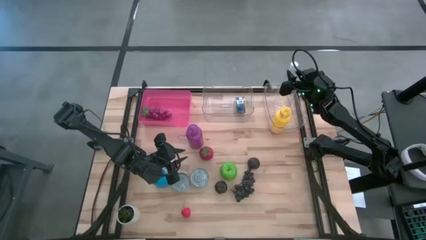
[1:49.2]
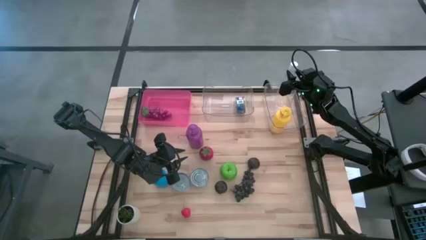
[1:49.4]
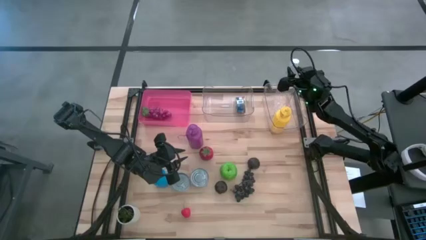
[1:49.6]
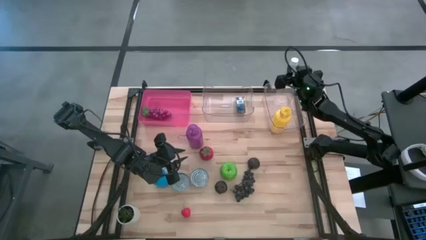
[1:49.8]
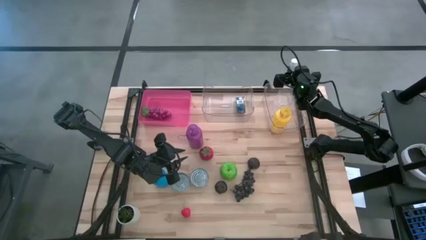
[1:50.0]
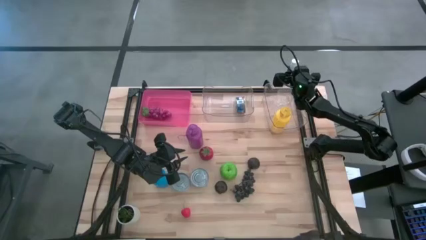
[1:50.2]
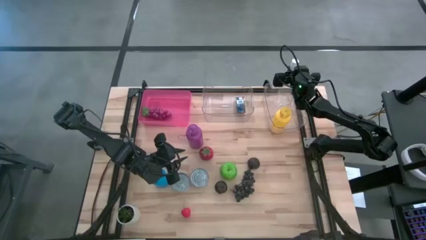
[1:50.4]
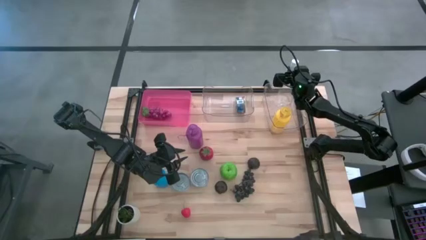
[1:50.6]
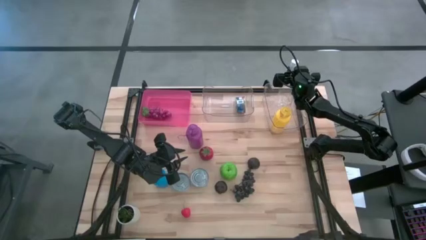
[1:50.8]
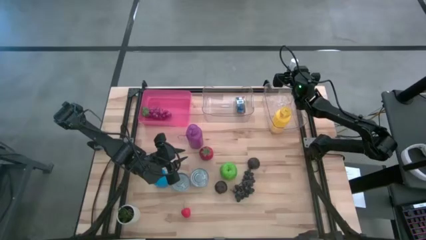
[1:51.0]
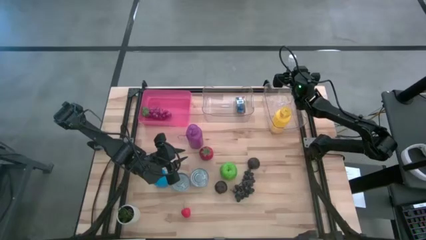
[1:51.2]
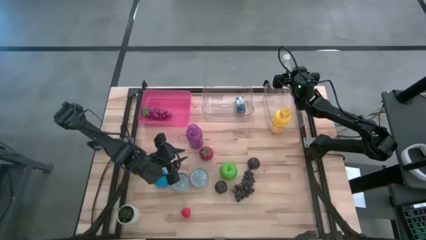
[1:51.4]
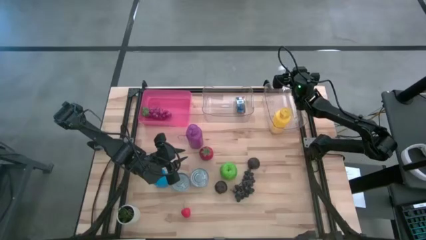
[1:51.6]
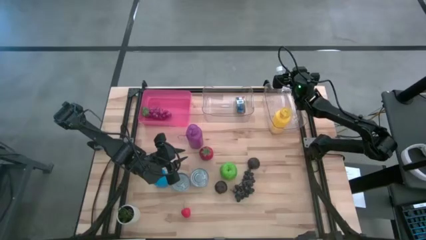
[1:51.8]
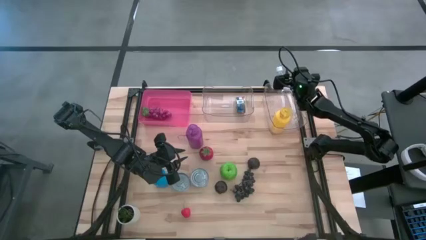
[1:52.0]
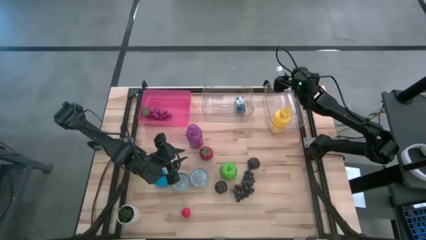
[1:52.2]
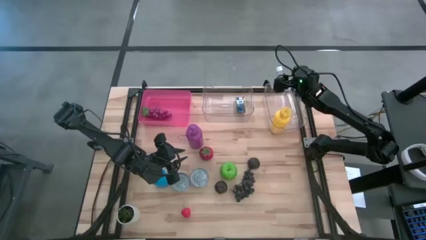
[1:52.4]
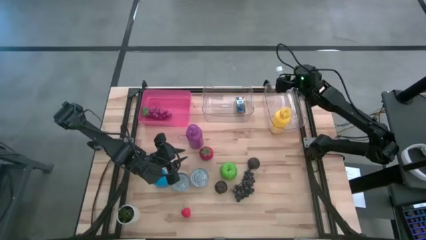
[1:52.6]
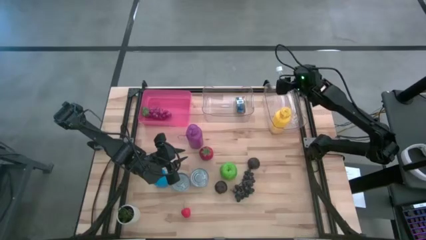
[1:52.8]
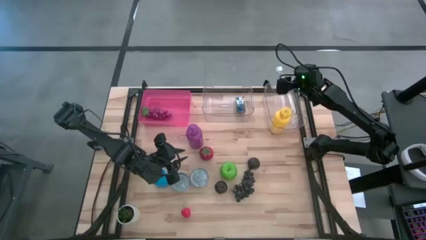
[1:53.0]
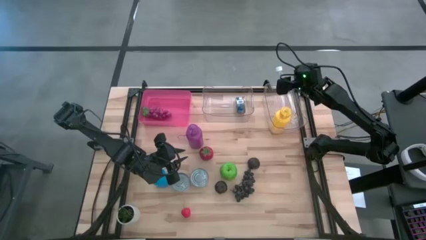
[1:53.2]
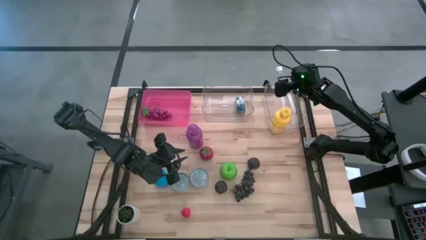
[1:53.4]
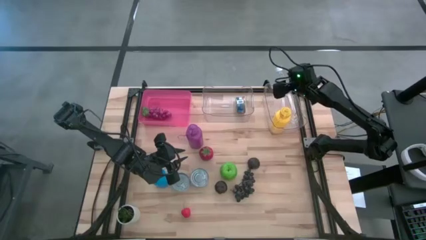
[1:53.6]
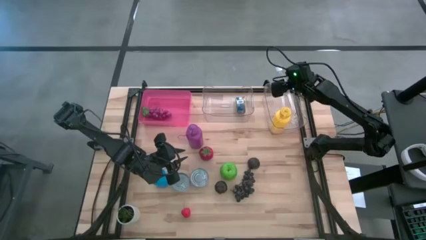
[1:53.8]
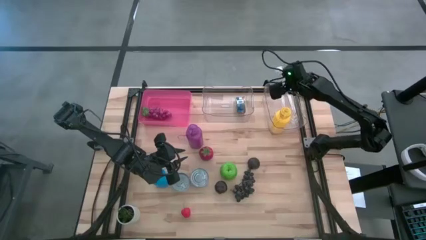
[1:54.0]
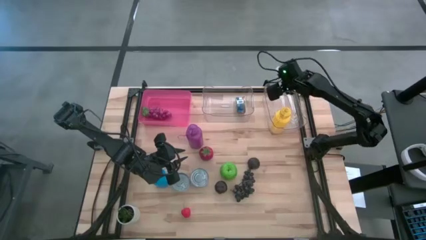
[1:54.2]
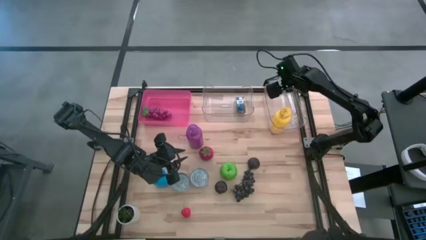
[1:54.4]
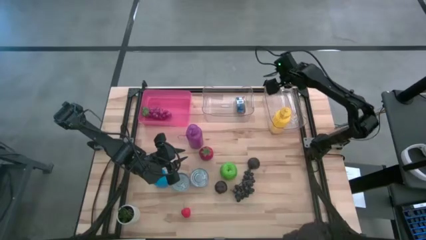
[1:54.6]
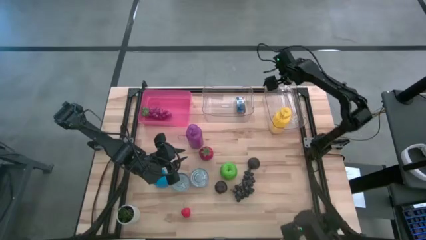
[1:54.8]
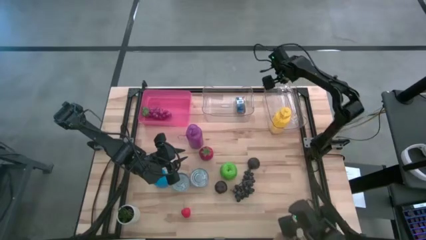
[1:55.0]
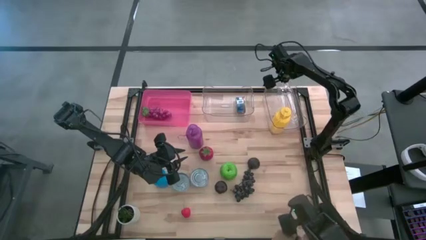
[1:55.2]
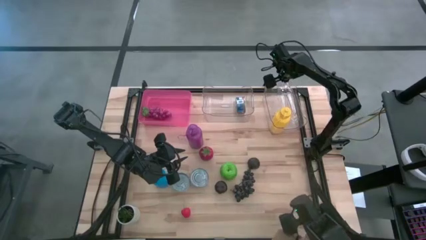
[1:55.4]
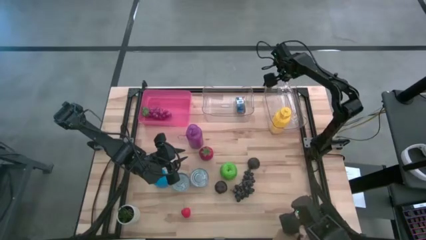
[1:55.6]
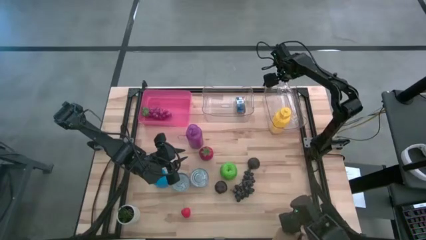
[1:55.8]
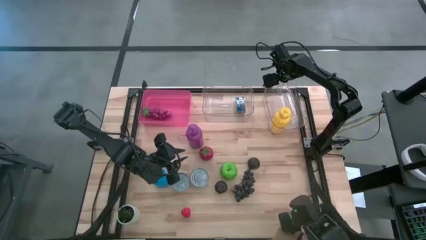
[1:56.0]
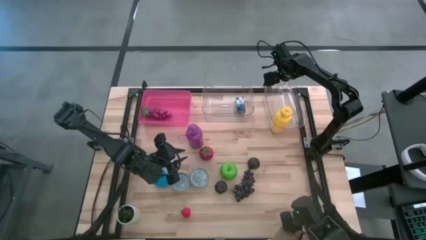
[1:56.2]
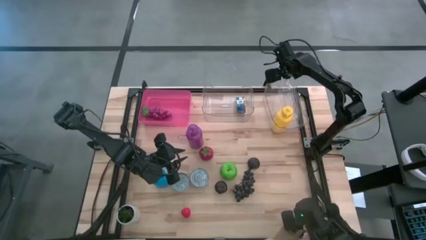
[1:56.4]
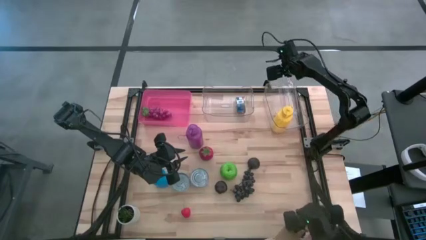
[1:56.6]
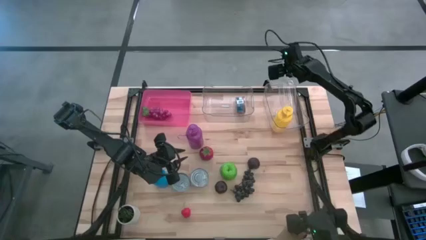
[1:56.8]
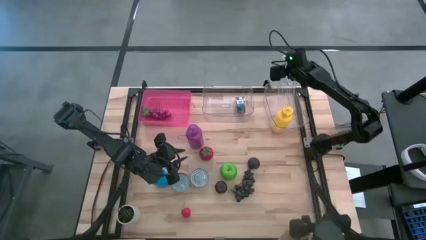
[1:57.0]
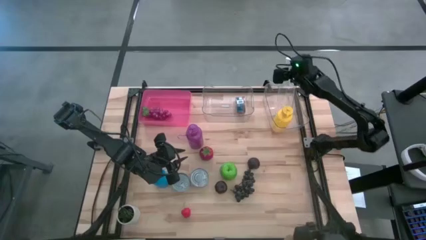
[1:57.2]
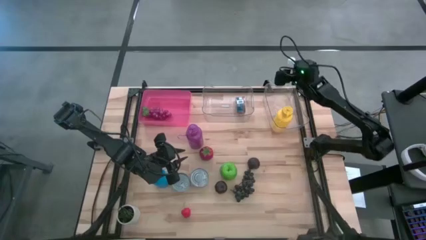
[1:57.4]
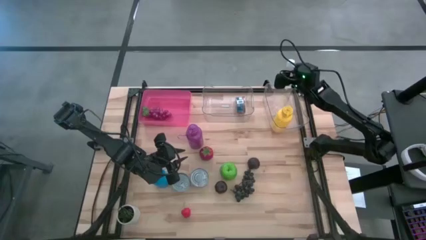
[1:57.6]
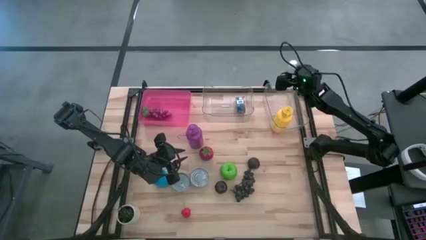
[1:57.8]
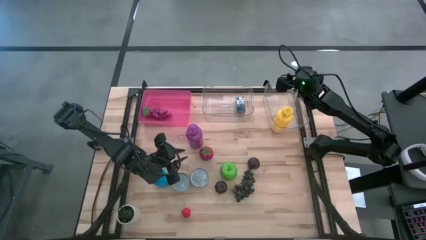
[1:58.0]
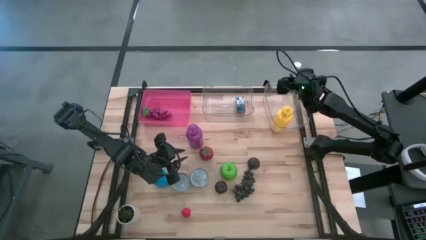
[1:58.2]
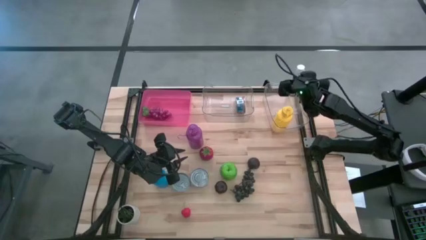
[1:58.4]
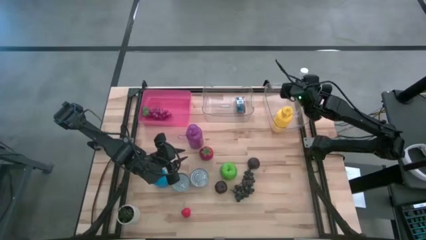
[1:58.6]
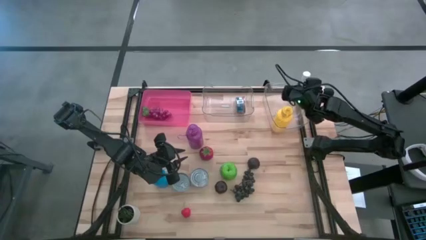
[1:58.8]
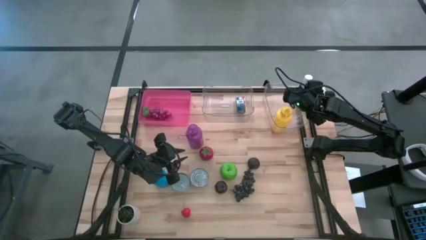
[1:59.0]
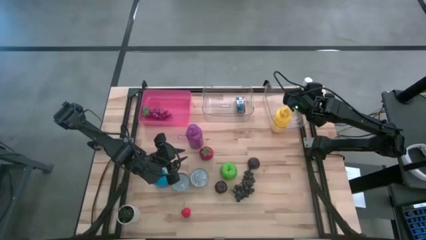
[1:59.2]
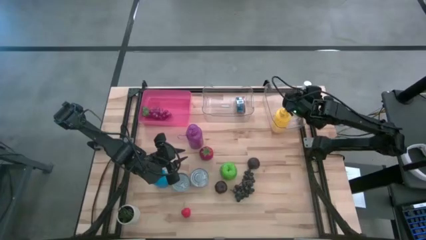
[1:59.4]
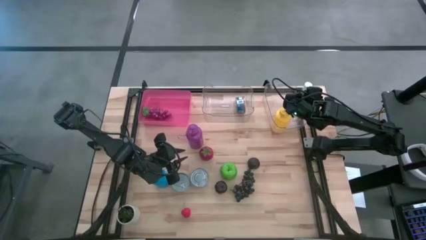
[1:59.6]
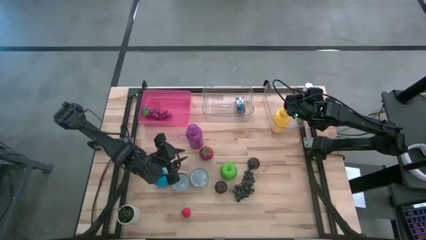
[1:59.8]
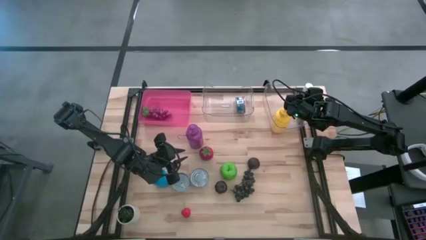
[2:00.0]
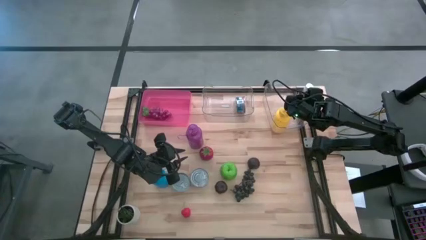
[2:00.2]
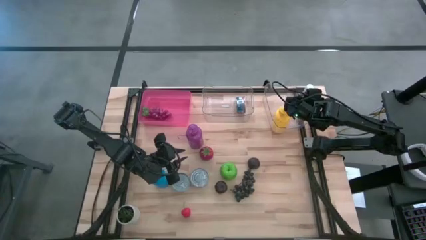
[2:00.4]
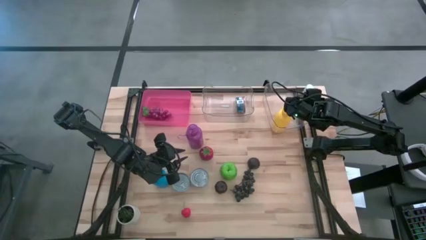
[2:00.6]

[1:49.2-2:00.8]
Task: Pick & Place Food Item
Adjust the transparent water bottle in the right transparent bin

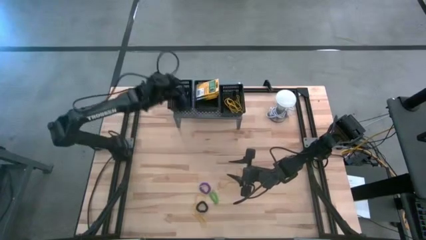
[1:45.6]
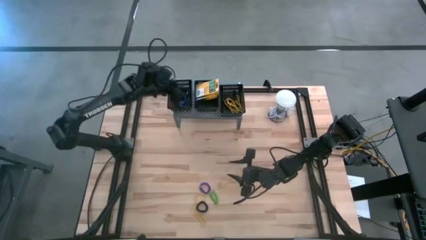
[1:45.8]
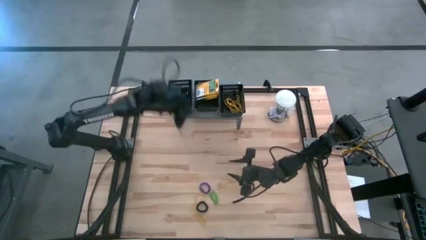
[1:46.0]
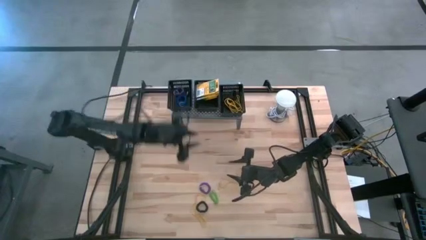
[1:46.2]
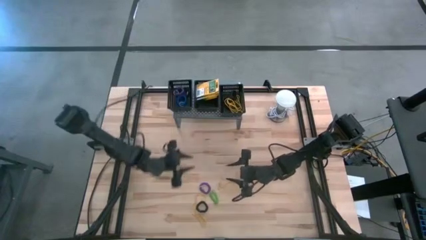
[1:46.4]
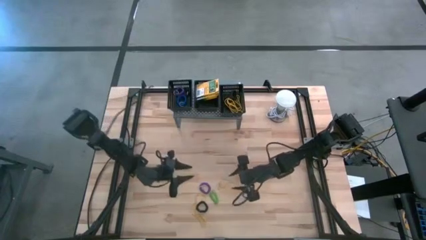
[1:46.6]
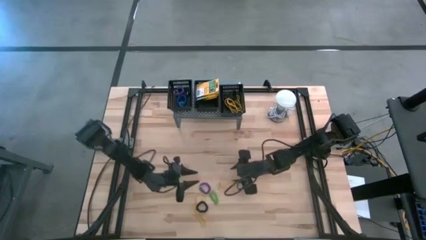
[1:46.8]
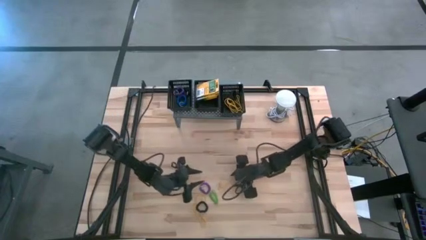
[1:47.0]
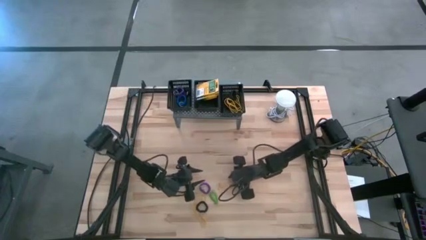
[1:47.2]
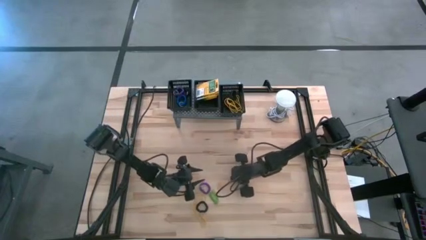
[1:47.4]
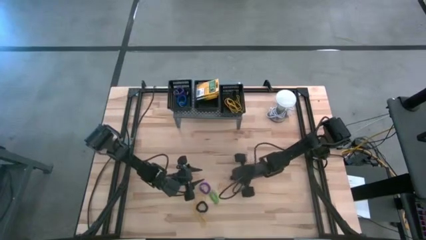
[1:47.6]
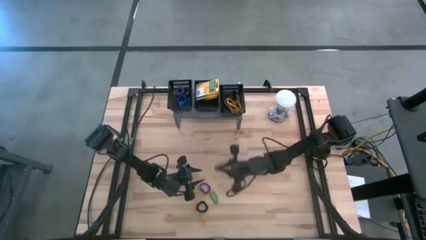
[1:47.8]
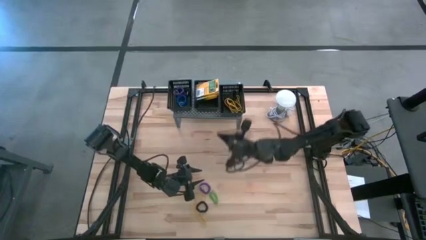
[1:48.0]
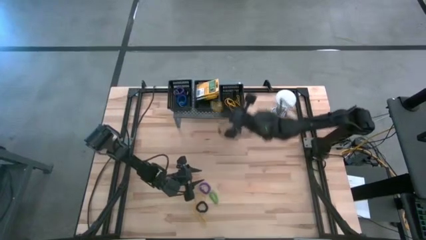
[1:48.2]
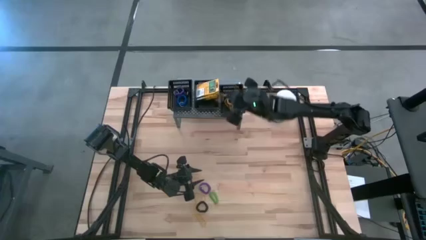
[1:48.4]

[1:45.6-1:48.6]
Task: Pick & Place Office Desk Supplies
Put the yellow rubber band into the right black bin on the shelf

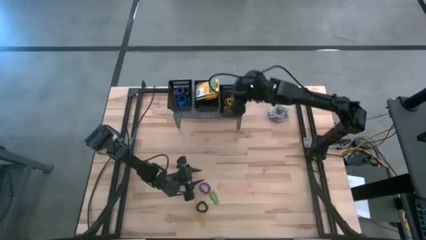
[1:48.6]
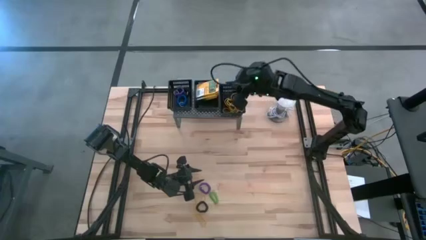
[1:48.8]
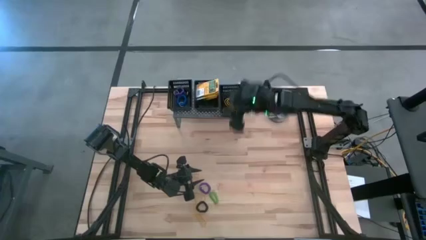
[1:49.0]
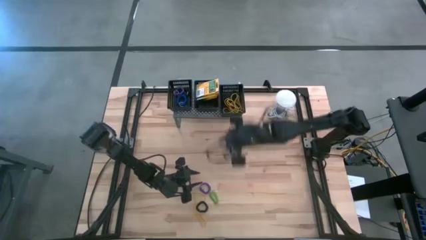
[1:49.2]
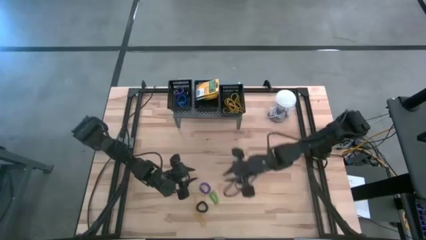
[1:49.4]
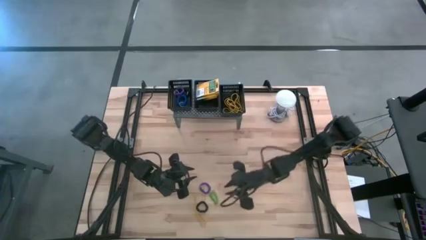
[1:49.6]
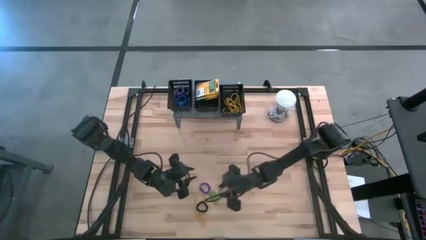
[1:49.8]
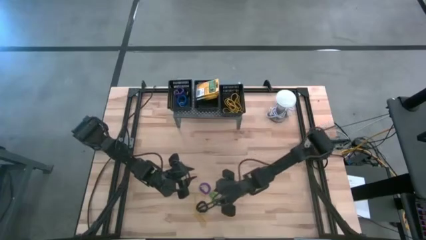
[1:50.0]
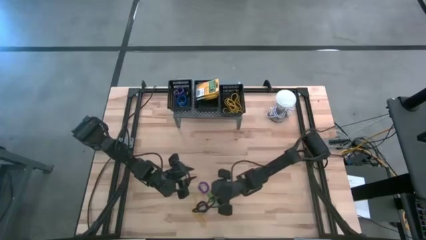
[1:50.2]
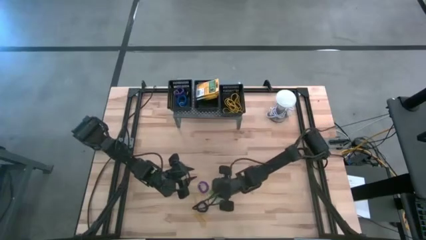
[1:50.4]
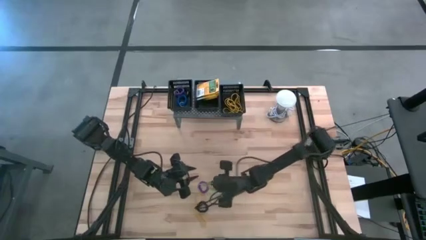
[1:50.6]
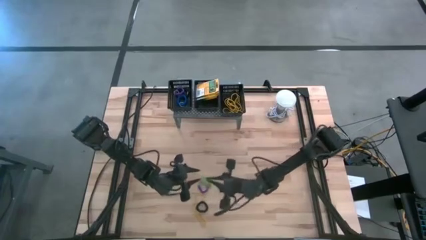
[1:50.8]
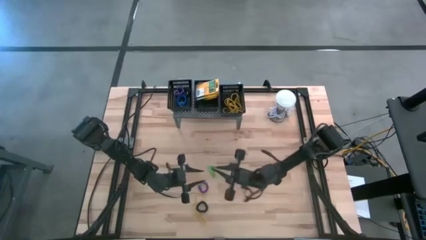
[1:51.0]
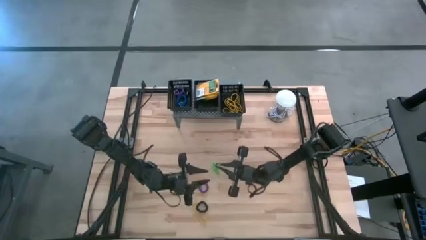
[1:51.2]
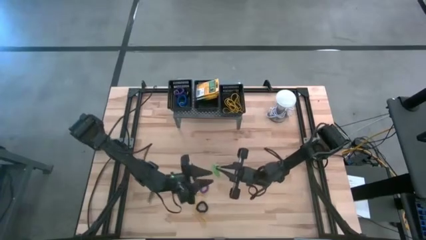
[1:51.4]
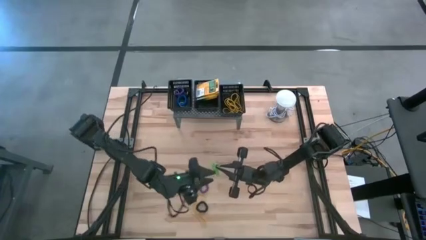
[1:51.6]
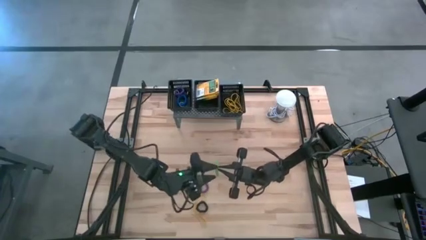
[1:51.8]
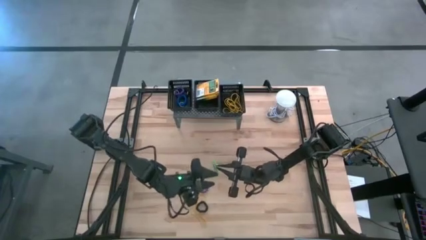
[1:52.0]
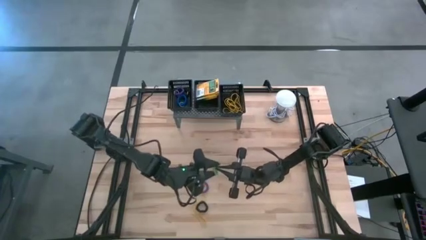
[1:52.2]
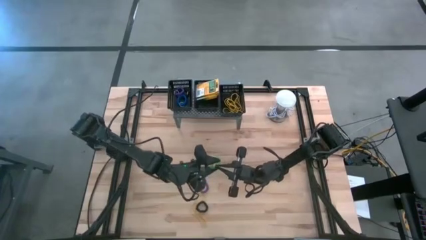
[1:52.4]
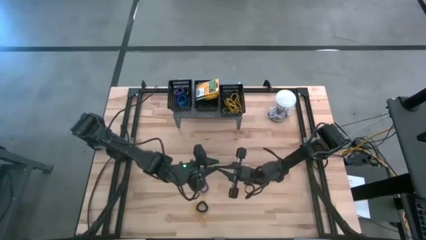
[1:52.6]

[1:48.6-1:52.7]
Put the green spring keychain into the left black bin on the shelf
